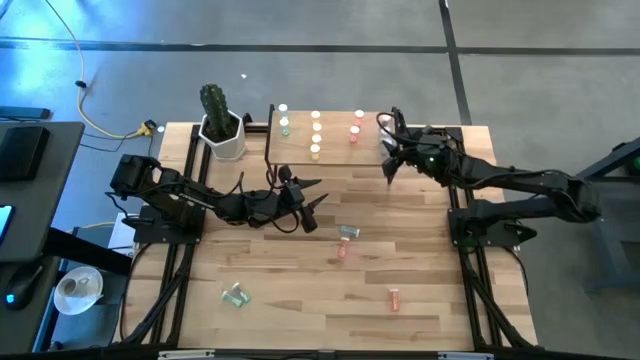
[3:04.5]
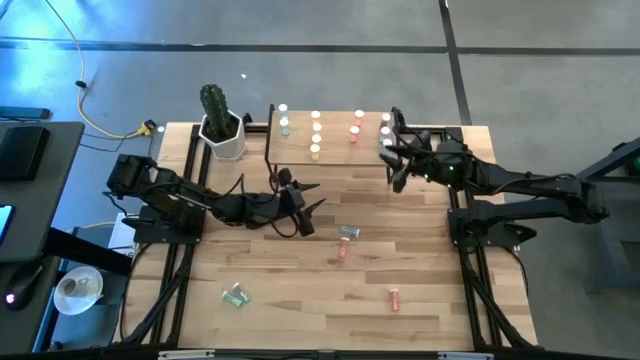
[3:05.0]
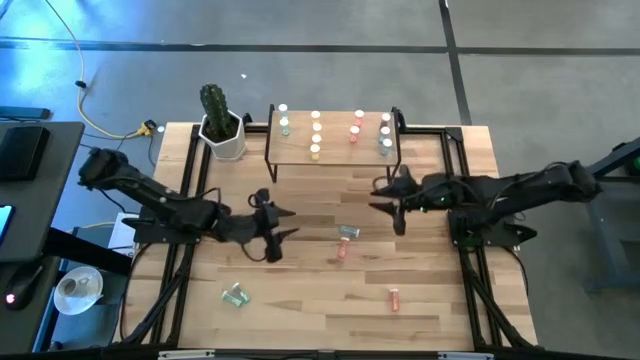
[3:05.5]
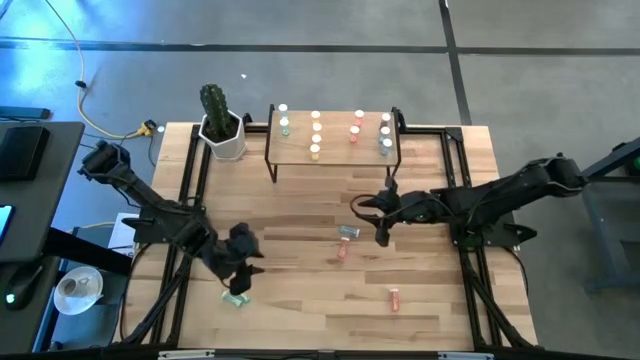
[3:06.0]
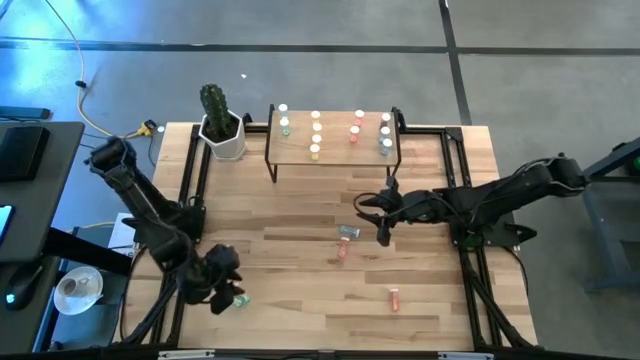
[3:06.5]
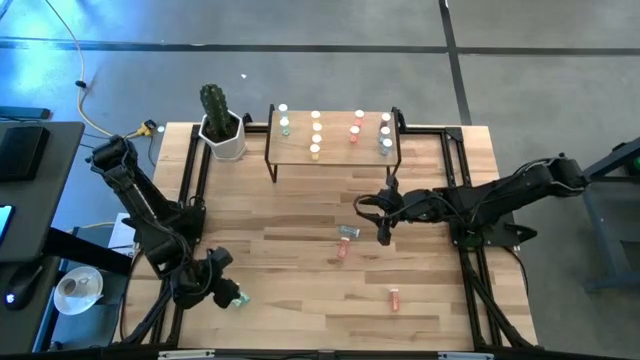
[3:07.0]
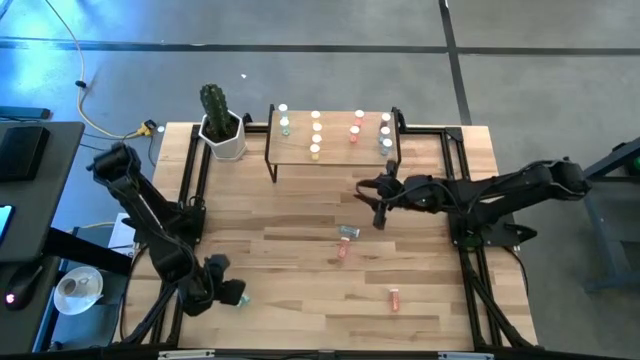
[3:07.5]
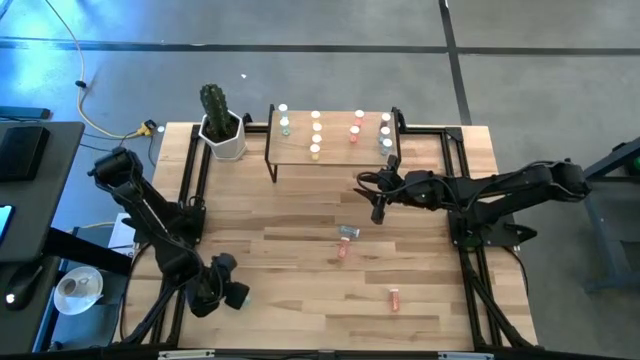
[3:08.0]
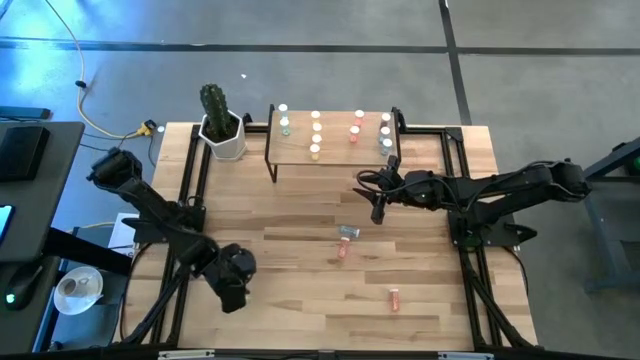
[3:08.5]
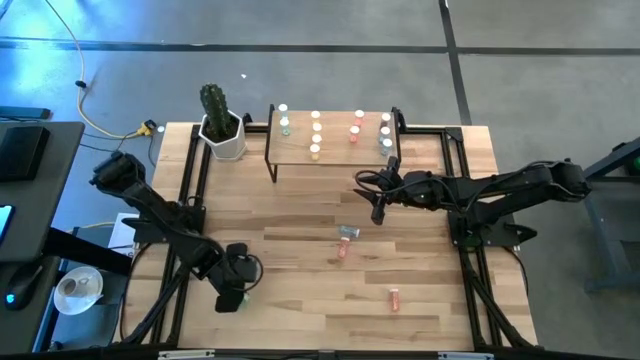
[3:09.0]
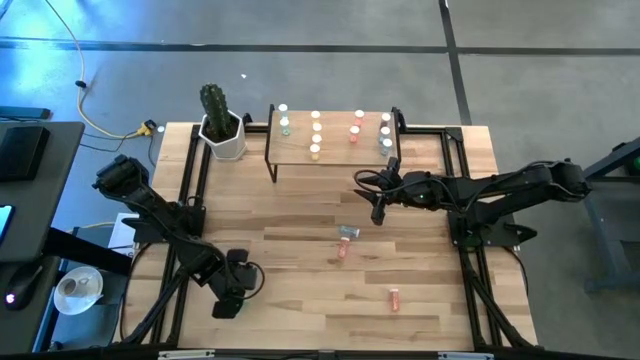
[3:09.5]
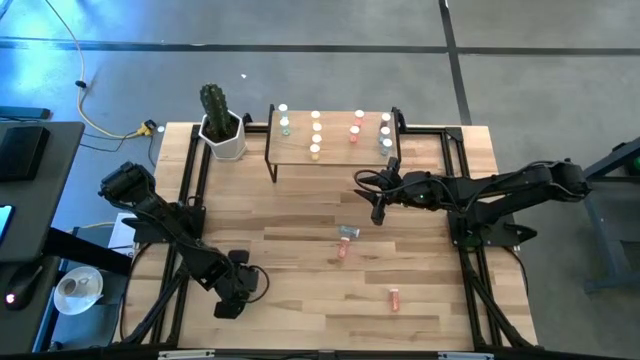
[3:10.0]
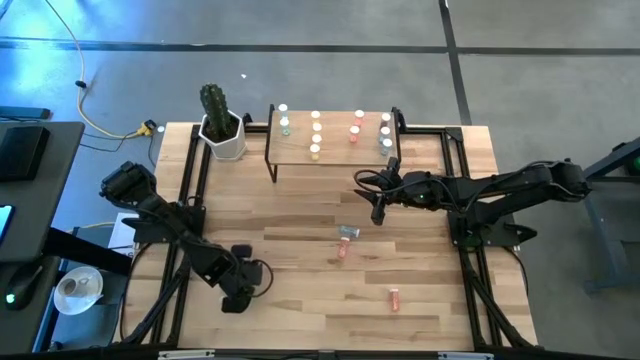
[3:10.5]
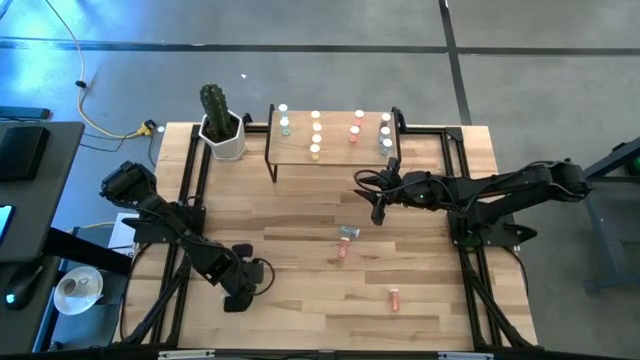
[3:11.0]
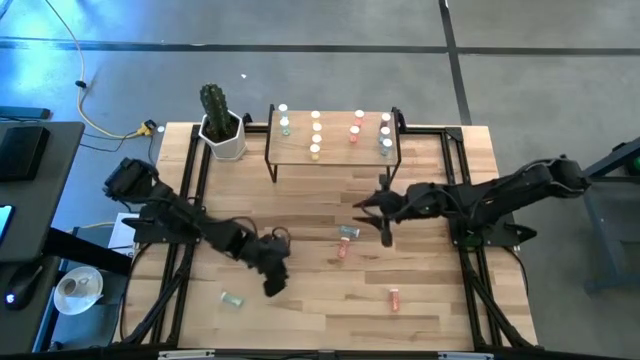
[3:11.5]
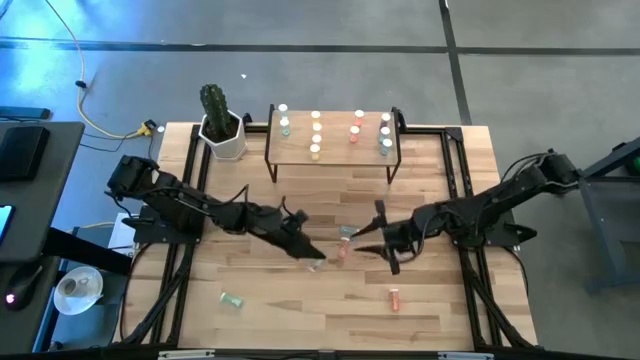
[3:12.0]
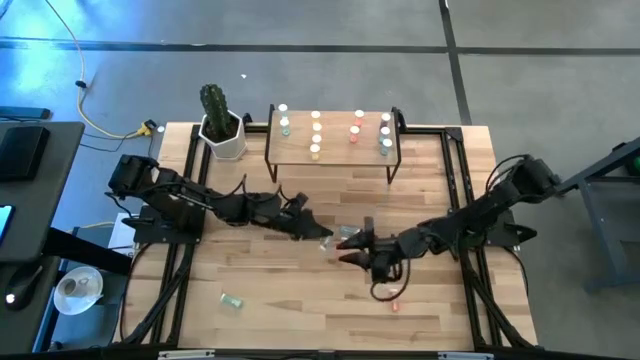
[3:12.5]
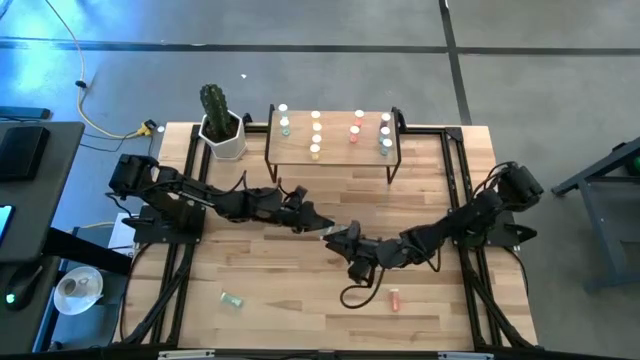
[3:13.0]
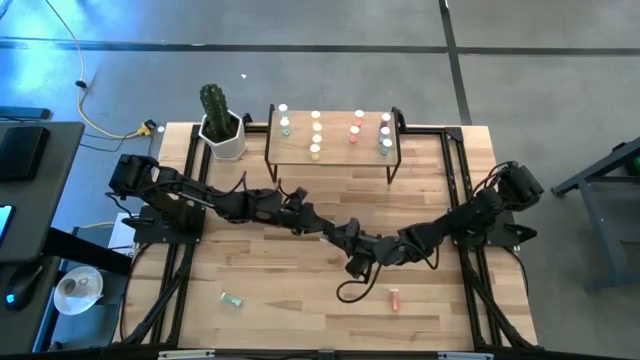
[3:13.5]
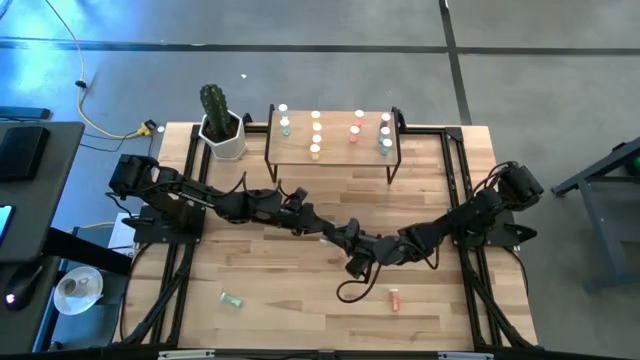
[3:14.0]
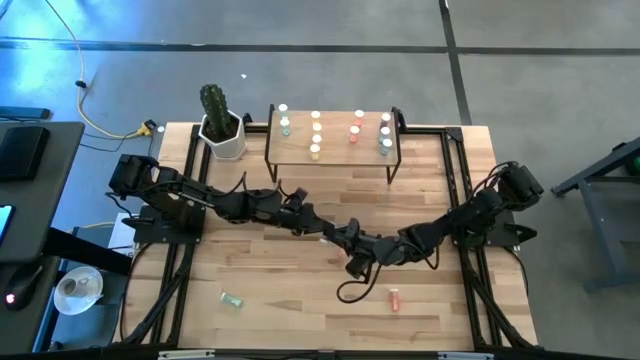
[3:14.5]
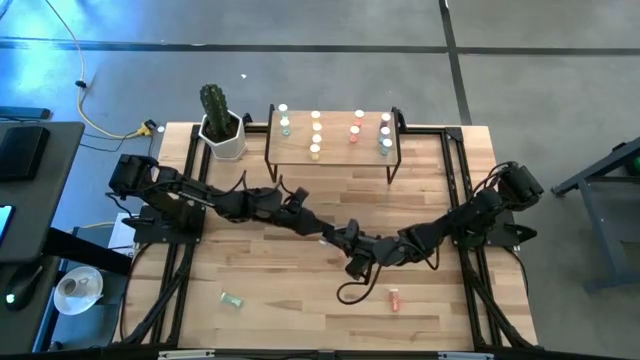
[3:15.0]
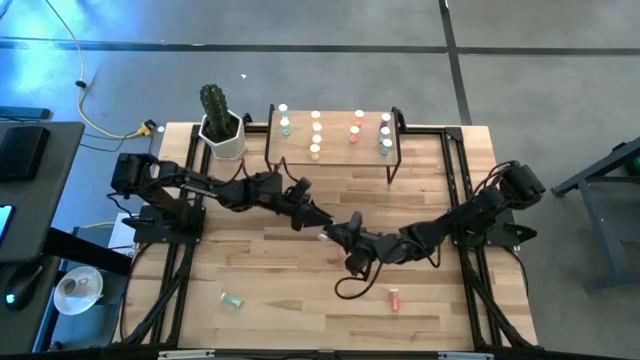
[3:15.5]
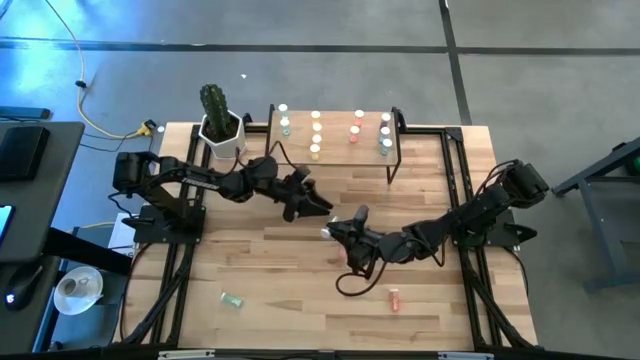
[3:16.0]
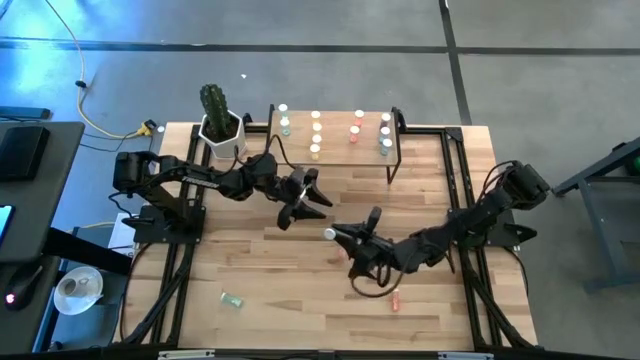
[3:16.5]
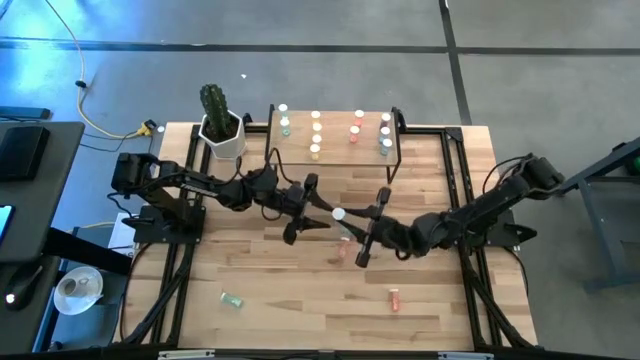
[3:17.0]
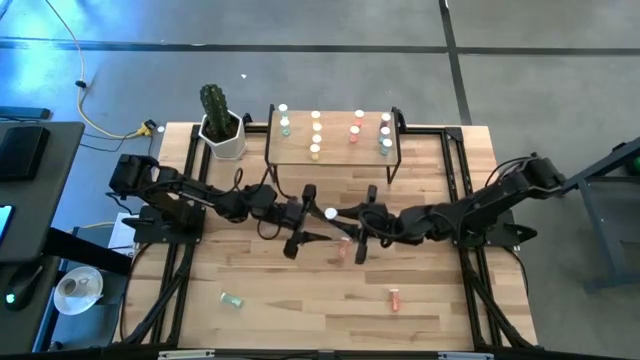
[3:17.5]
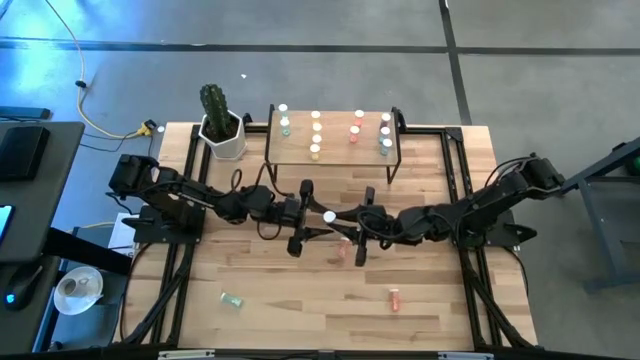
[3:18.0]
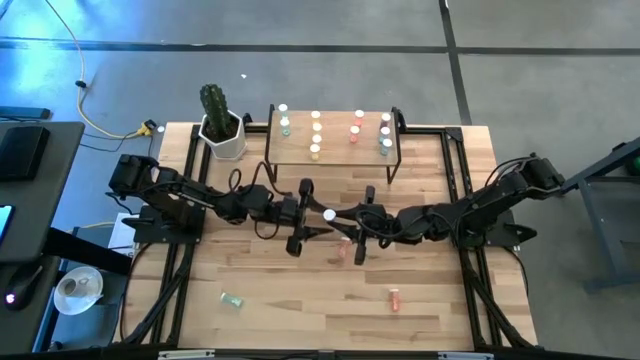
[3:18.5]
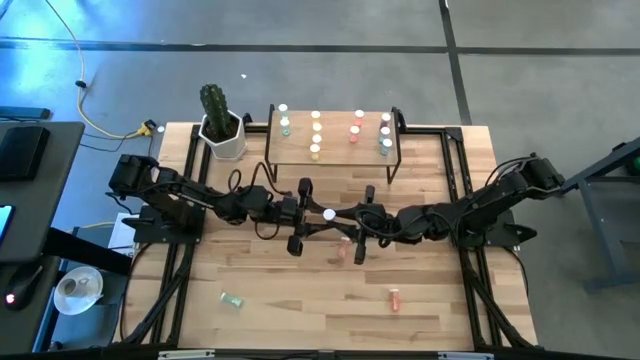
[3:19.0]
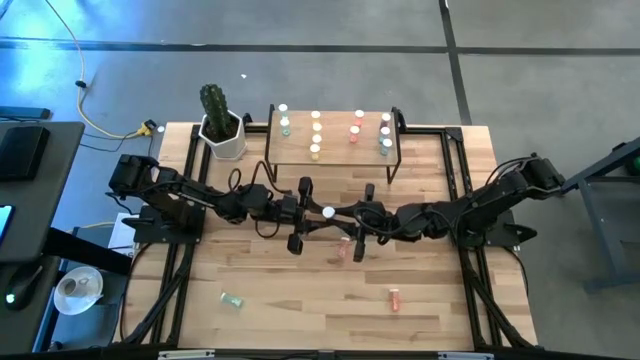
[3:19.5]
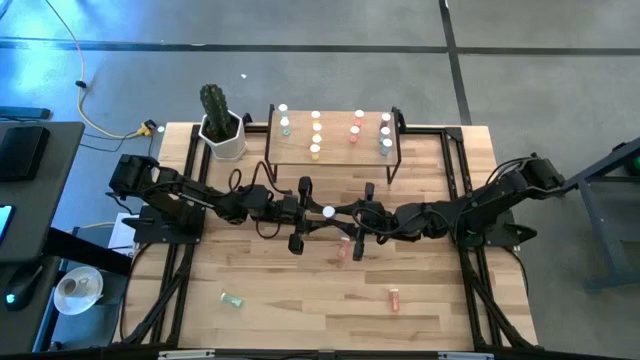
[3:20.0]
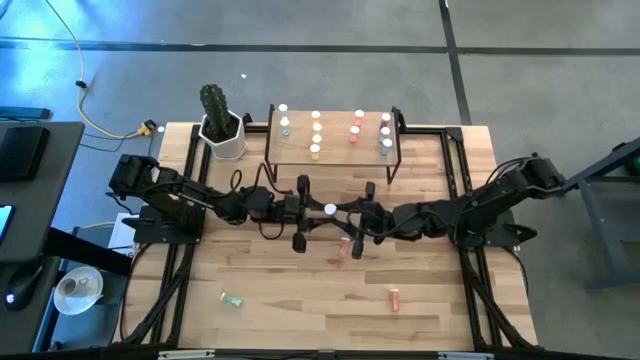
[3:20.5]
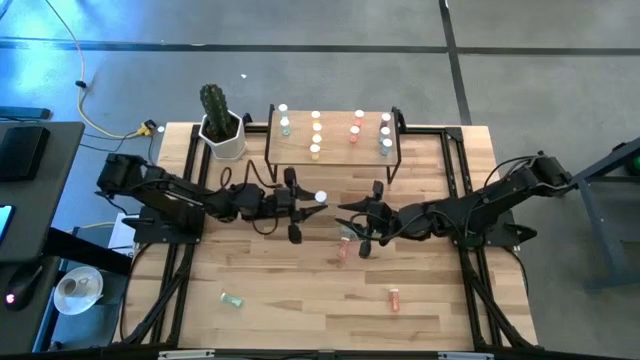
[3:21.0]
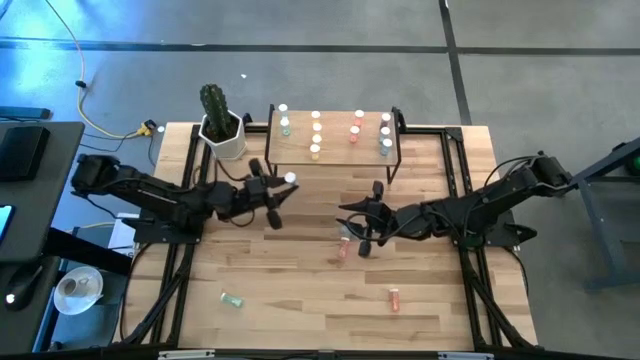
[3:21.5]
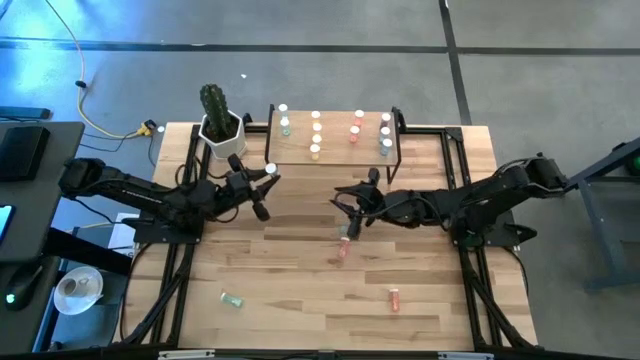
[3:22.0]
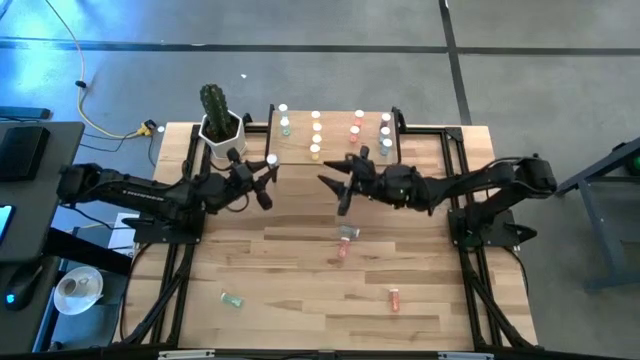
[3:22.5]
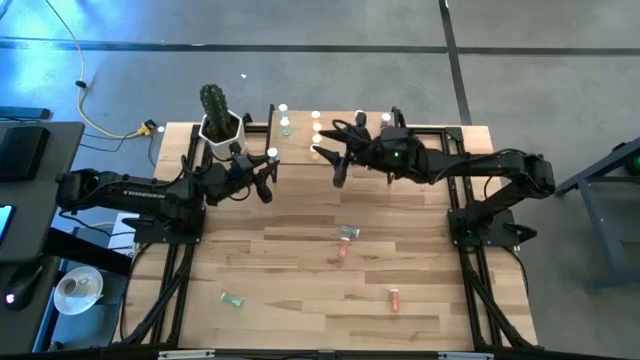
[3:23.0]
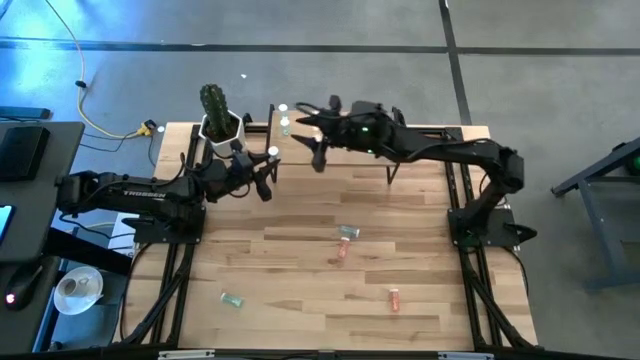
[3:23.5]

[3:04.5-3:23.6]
Task: Pick and place medicine bottles onto shelf by color
Put the light blue pill bottle on the shelf aligned with the other light blue pill bottle

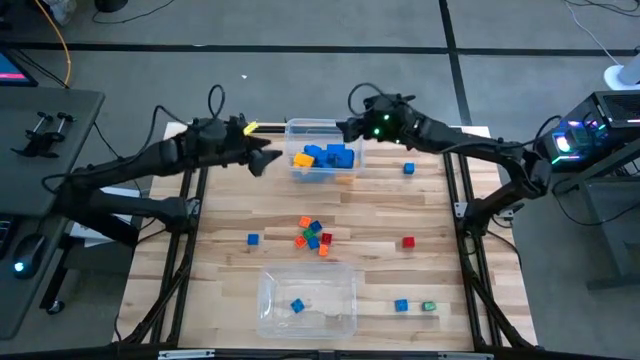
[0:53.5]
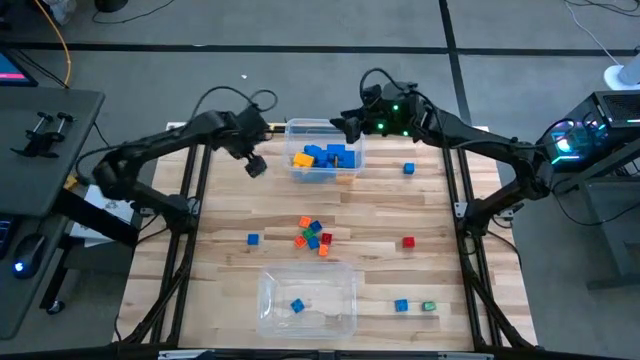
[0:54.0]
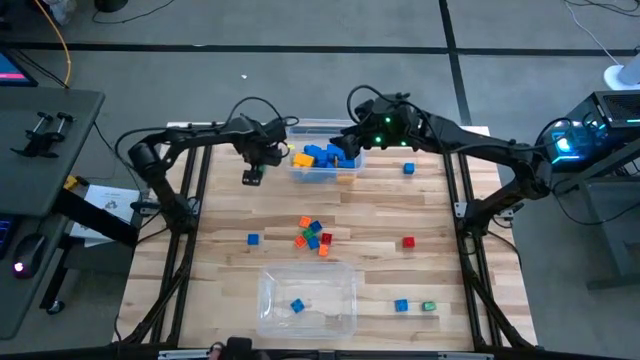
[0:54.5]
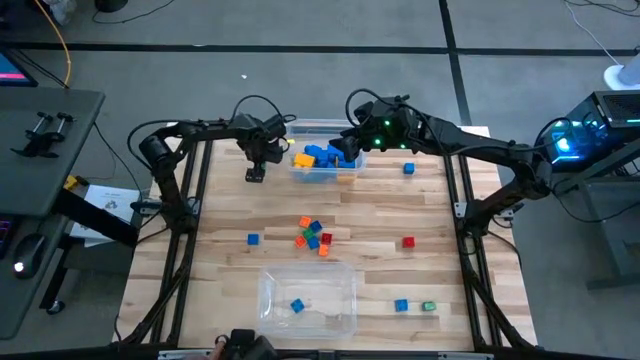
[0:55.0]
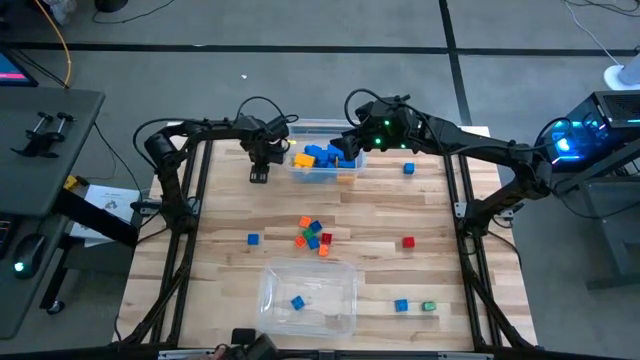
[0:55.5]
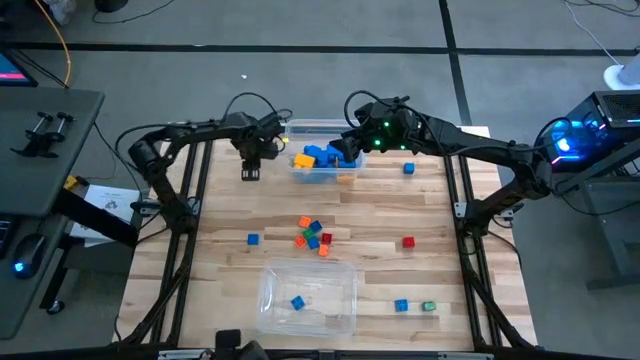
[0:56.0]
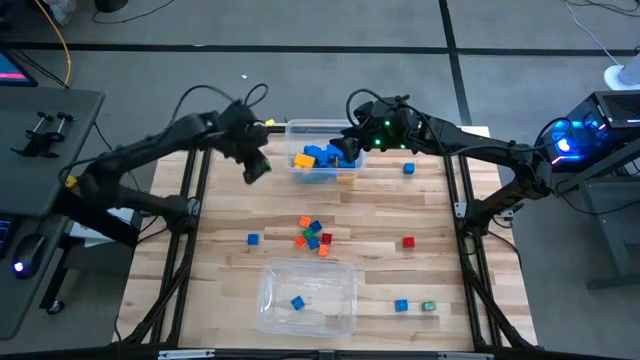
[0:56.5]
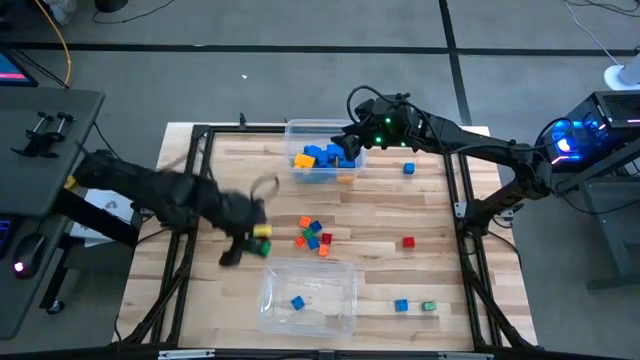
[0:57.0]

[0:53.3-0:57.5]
Task: Sort blocks by size
Put the small green game piece into the bottom transparent bin
